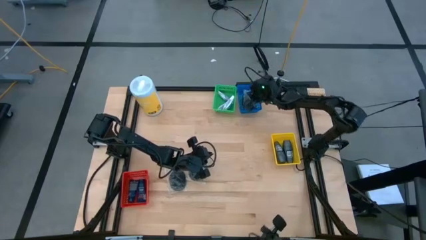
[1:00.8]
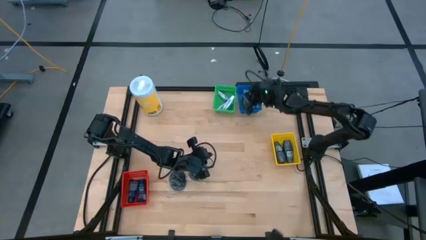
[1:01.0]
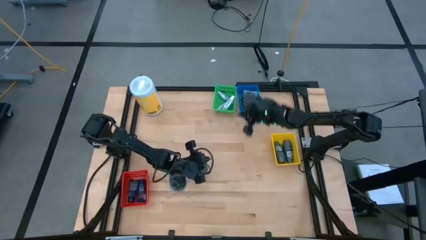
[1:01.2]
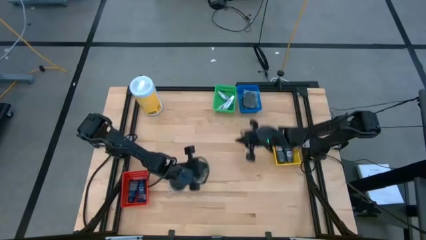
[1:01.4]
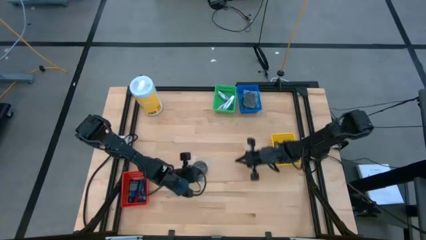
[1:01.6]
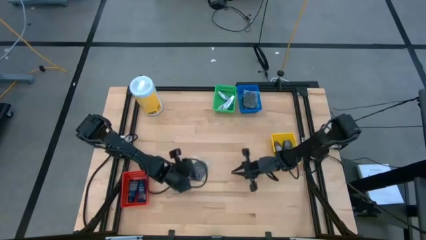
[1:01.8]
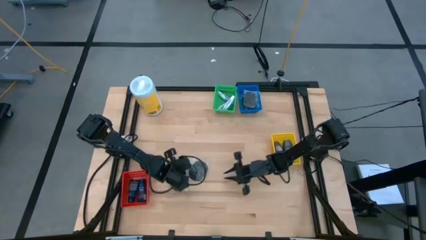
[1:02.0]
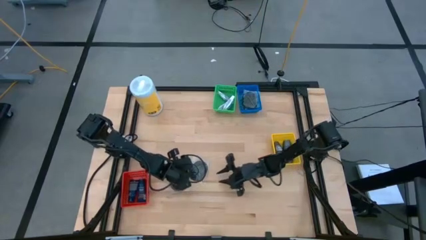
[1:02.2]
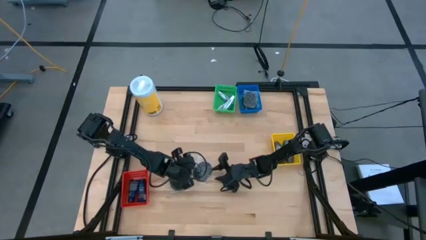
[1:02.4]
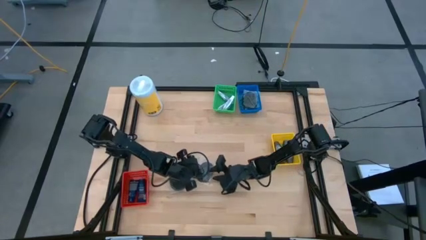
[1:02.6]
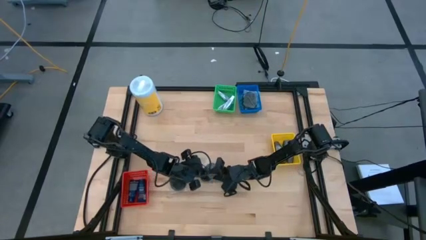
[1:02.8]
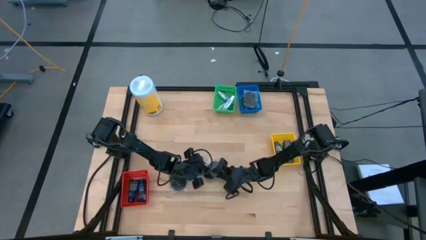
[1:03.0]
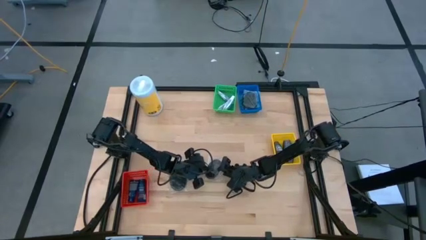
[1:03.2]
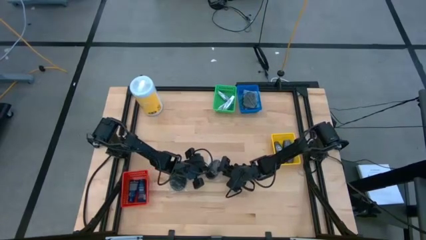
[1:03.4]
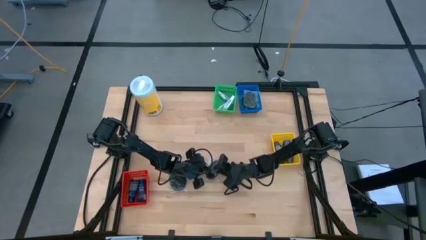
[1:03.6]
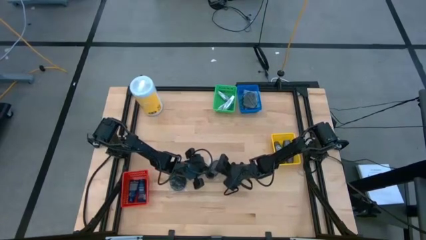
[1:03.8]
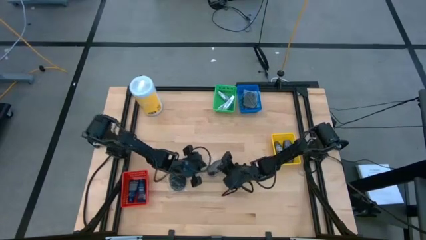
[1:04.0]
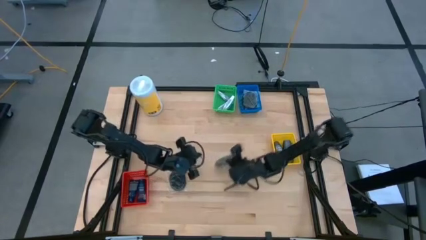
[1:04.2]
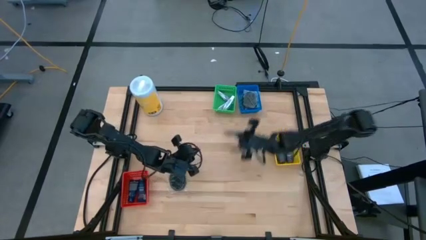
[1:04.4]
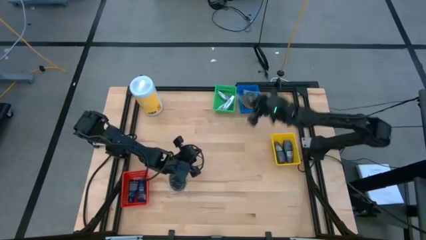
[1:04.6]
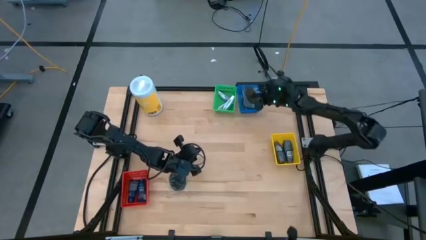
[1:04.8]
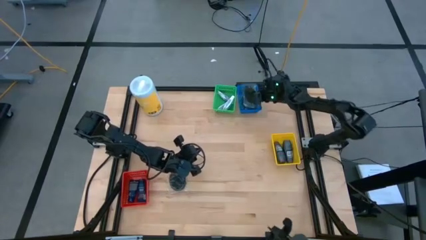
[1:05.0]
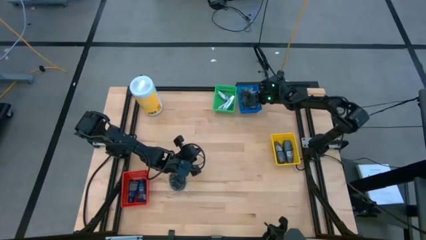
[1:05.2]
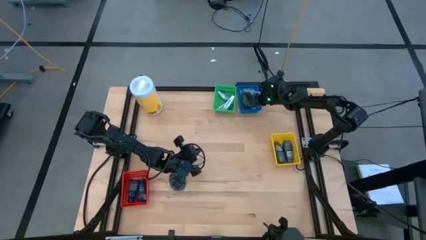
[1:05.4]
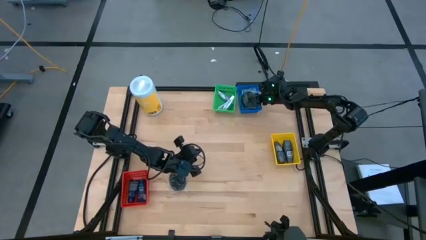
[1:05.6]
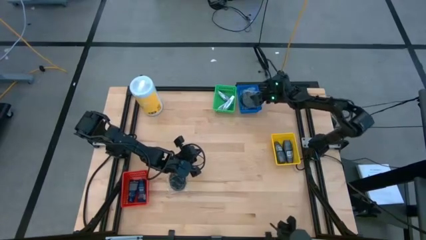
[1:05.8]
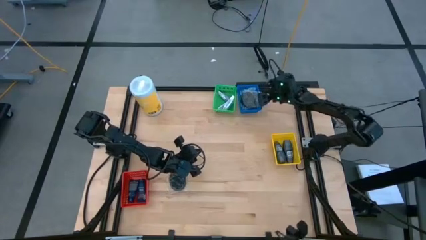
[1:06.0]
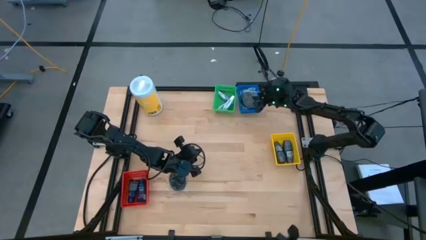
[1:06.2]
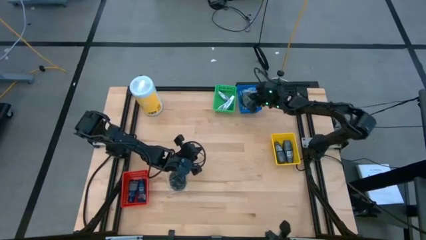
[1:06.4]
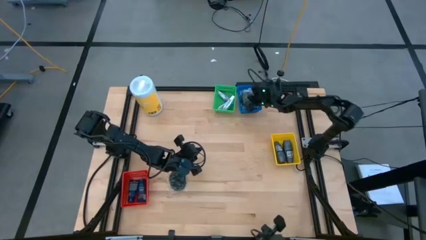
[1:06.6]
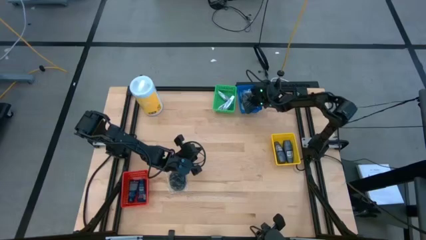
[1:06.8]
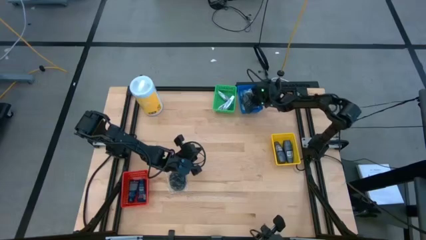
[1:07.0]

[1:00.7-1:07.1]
Task: Pick & Place Travel size toiletries
Put the black hairbrush into the blue basket

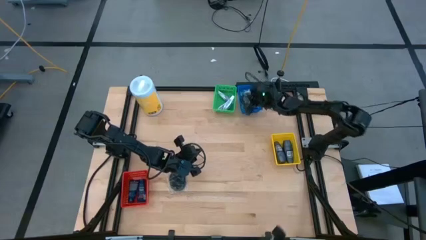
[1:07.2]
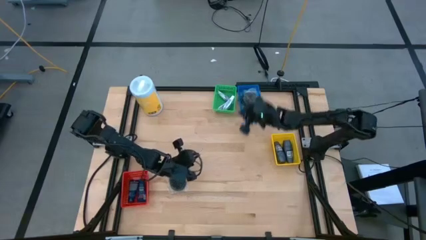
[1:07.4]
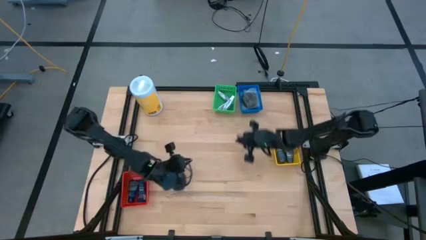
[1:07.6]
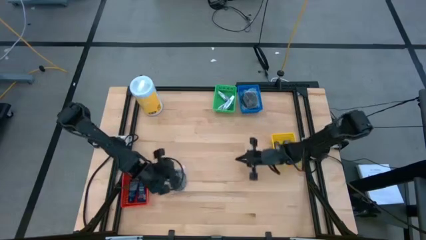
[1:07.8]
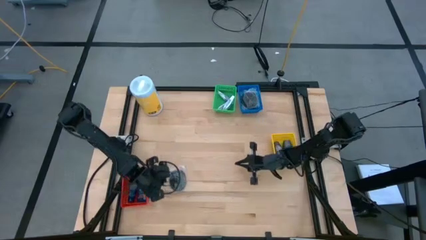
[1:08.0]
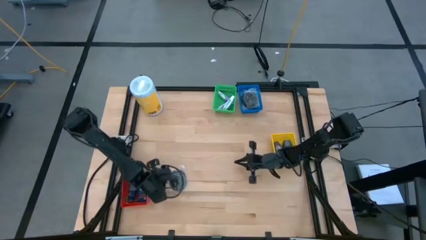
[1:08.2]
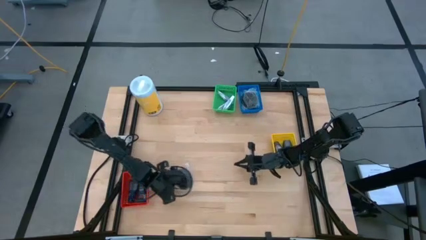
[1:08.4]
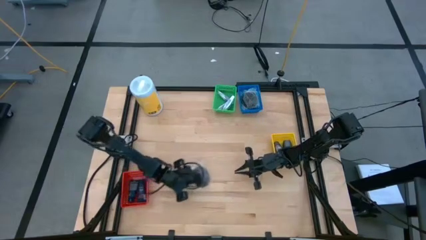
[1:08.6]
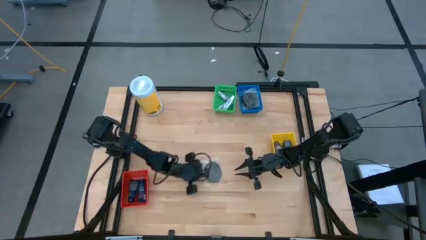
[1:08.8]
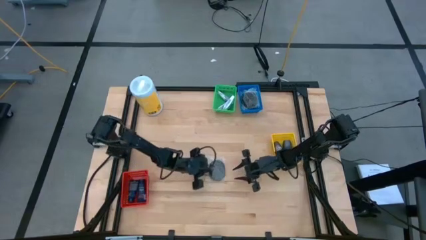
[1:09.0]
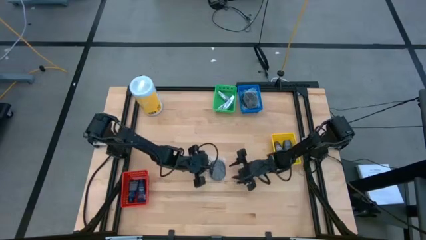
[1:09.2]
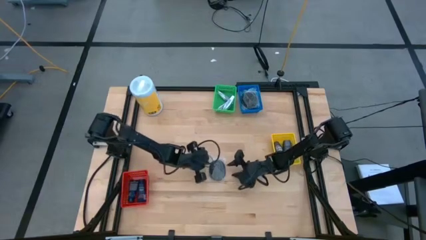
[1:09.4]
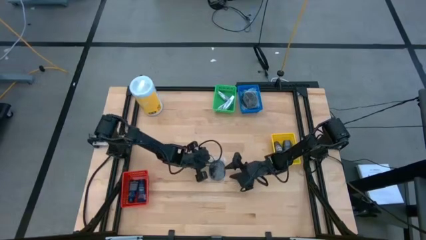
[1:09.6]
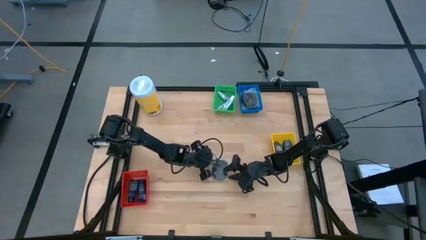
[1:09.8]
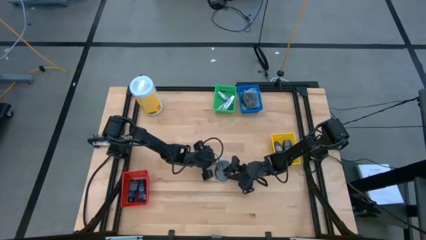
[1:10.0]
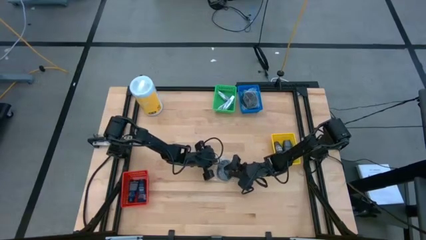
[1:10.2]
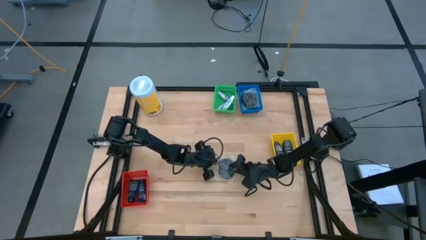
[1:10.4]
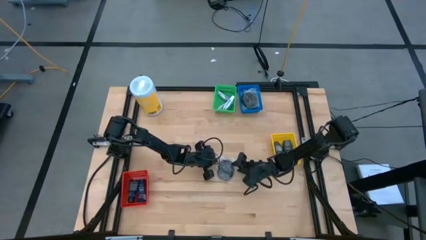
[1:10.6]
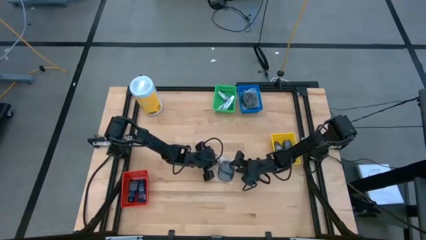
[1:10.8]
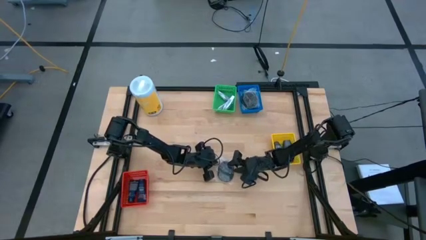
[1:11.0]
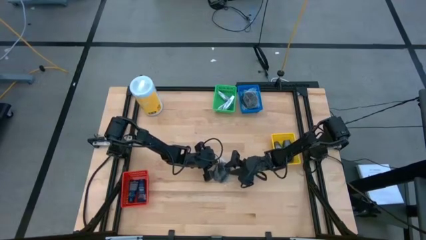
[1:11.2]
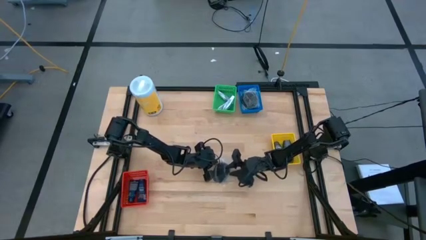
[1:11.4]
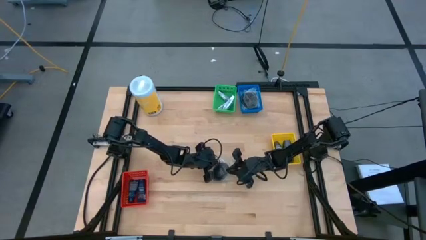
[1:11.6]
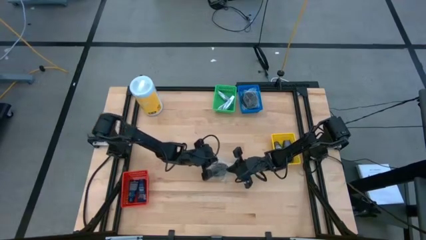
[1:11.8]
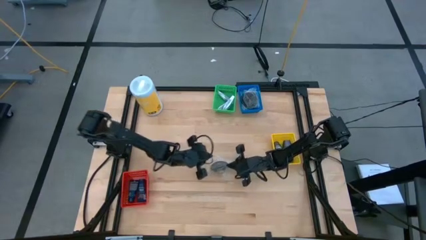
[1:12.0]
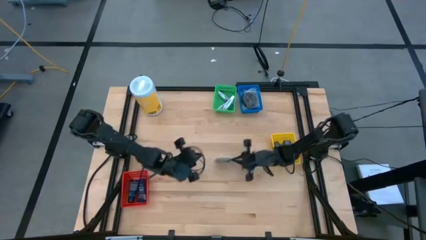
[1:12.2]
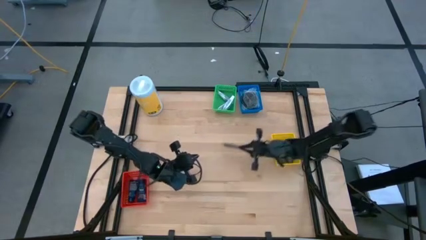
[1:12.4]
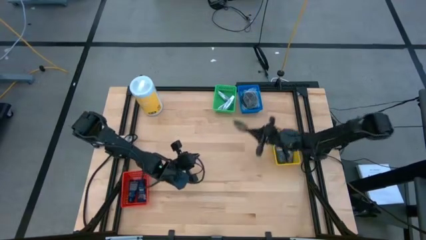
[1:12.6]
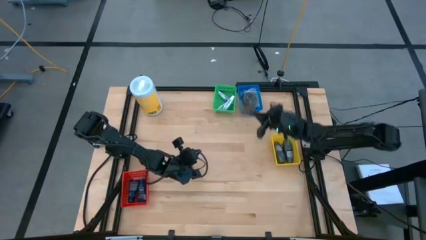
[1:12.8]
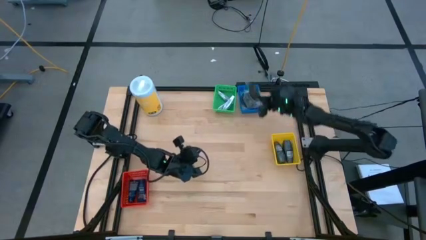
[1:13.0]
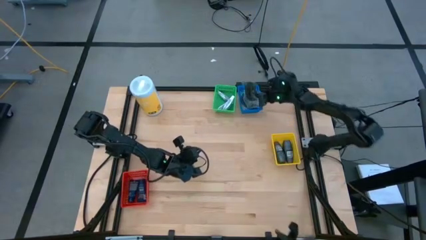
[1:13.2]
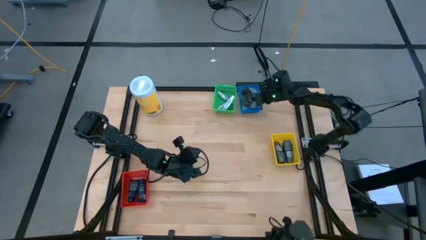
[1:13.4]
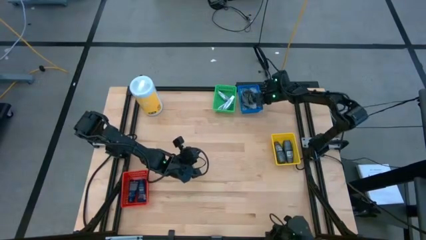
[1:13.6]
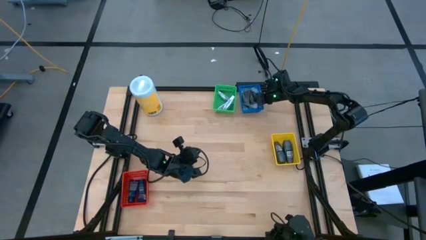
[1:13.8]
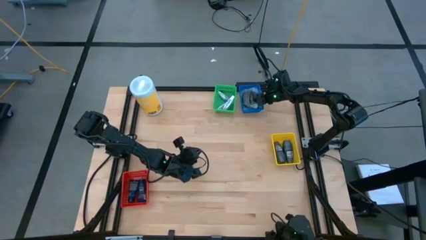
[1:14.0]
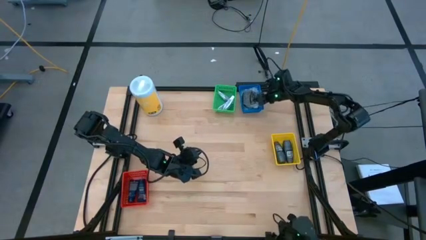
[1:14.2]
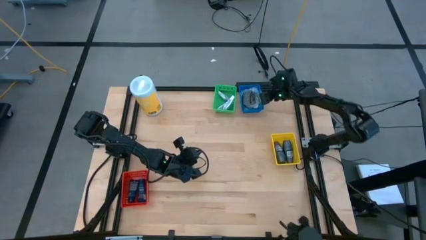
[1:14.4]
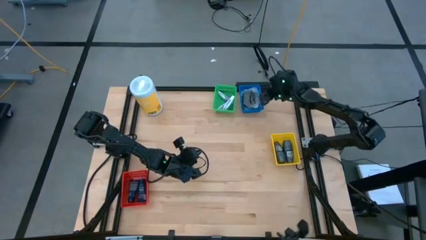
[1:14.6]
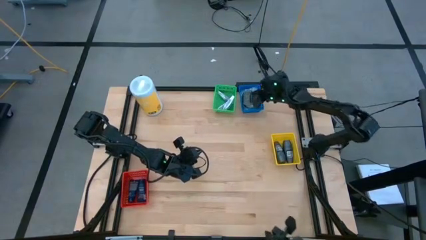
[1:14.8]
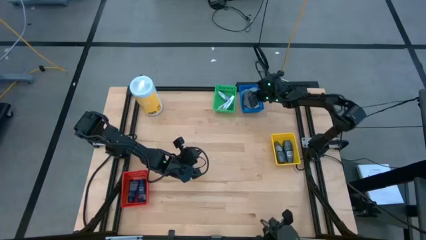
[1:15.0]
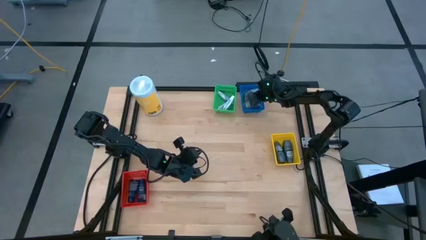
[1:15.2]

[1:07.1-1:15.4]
Put the black hairbrush into the blue basket

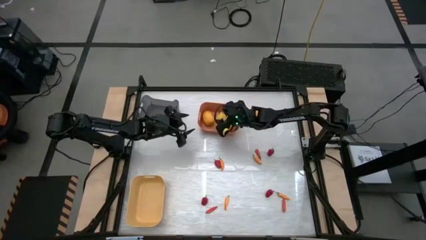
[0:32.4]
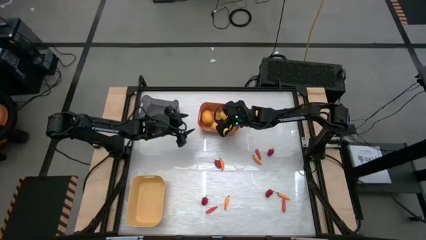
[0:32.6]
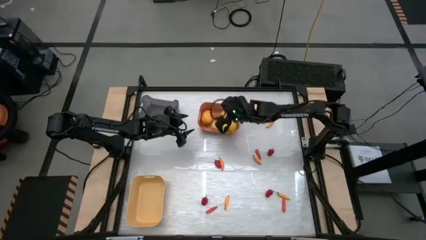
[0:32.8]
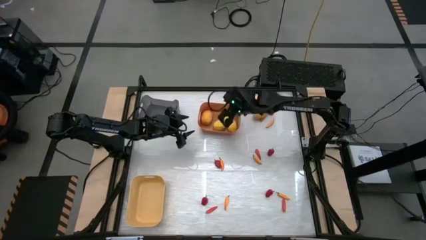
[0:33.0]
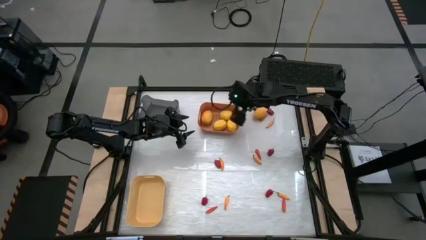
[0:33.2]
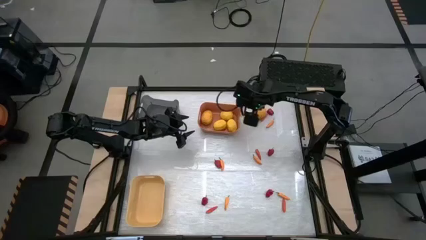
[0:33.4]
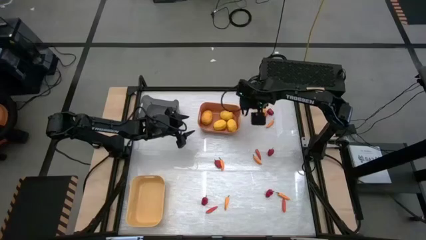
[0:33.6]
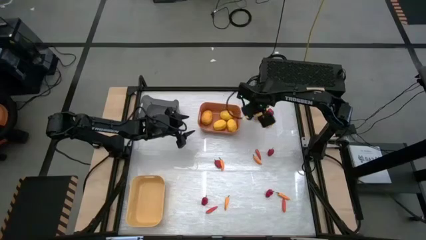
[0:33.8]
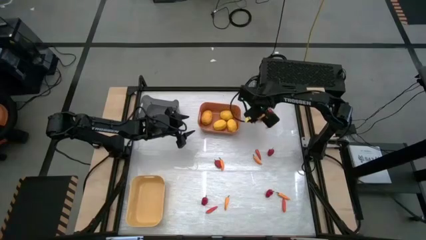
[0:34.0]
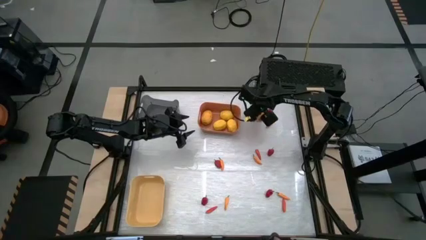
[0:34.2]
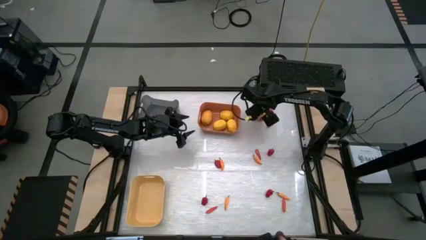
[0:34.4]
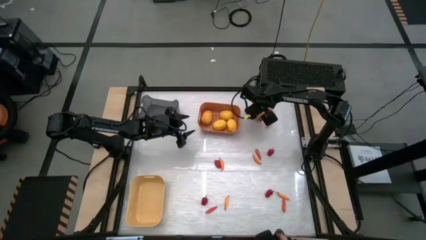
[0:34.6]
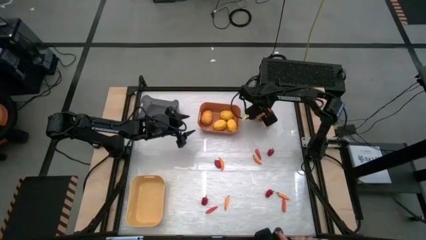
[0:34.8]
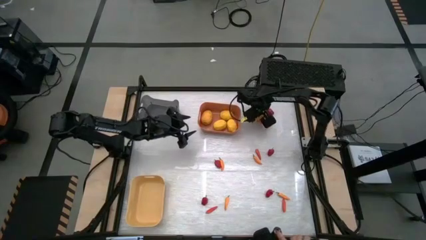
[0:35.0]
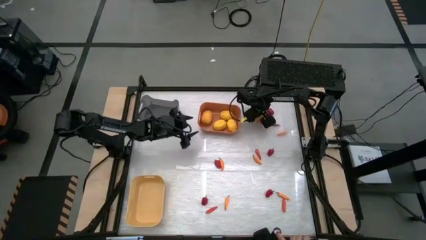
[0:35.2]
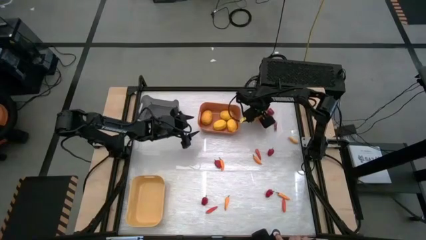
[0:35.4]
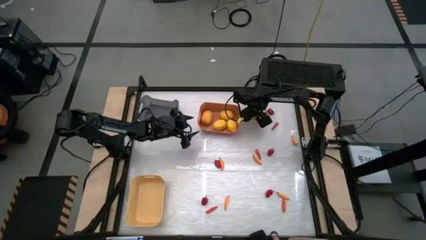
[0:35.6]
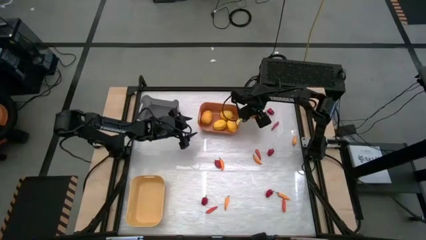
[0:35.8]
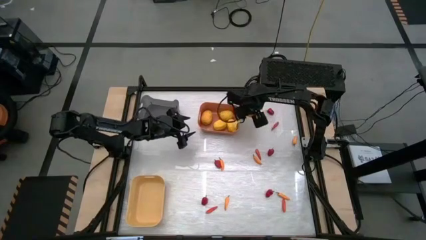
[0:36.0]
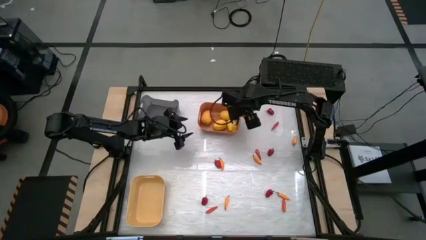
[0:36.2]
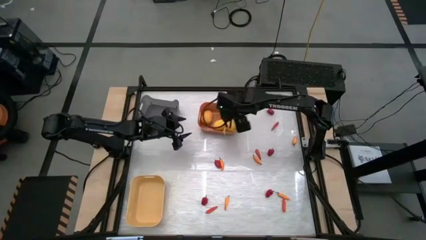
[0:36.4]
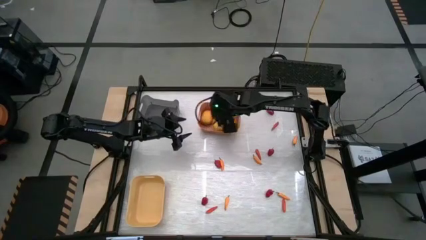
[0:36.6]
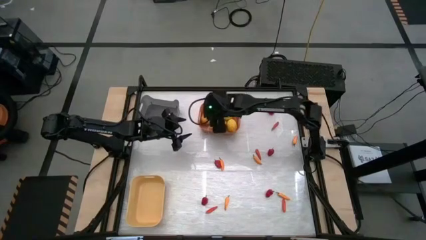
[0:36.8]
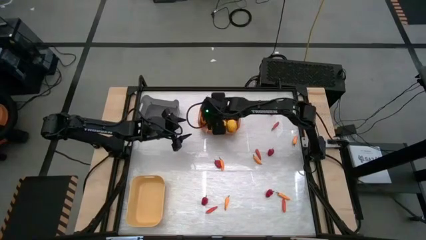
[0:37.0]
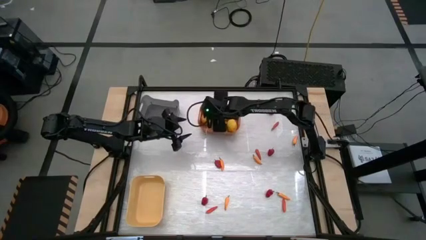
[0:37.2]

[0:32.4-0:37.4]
Task: Sort produce into baskets
Put the lemon into the orange bin
